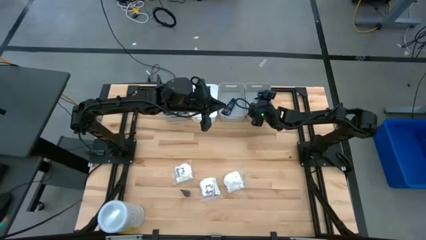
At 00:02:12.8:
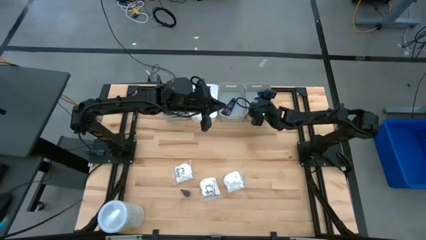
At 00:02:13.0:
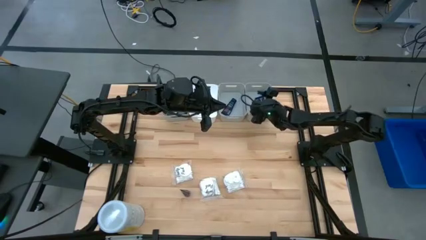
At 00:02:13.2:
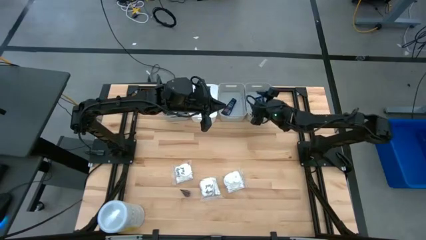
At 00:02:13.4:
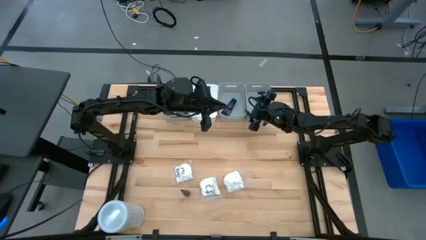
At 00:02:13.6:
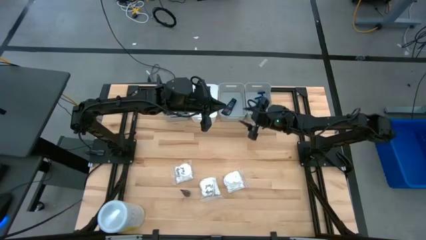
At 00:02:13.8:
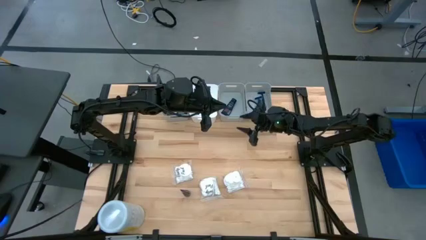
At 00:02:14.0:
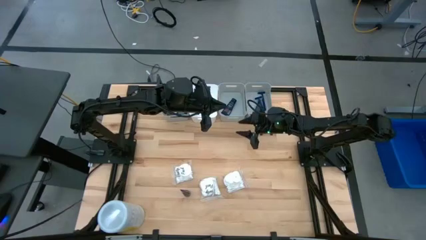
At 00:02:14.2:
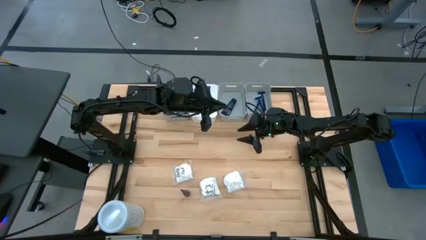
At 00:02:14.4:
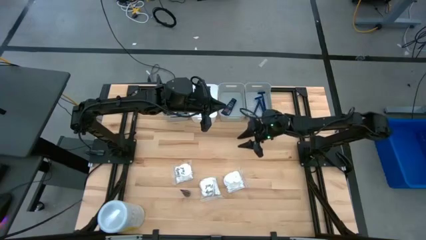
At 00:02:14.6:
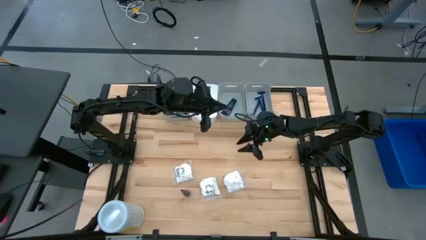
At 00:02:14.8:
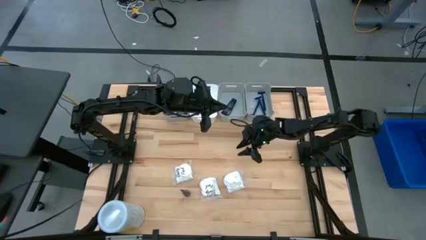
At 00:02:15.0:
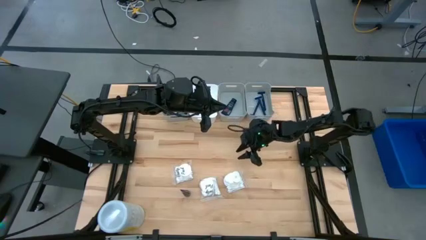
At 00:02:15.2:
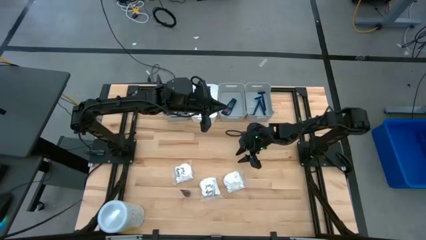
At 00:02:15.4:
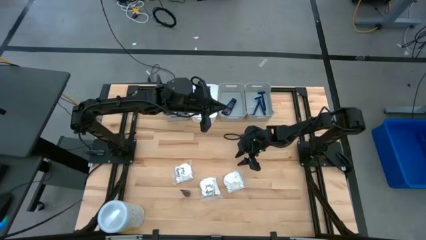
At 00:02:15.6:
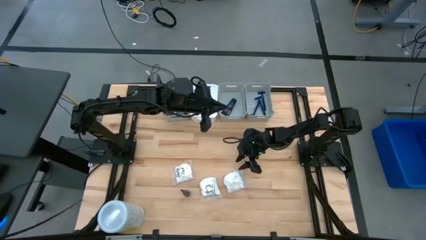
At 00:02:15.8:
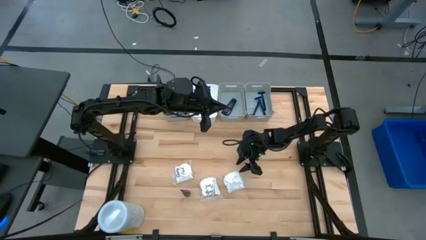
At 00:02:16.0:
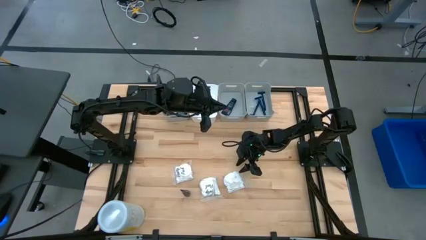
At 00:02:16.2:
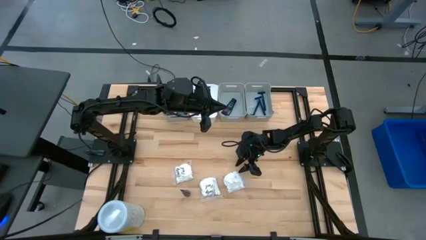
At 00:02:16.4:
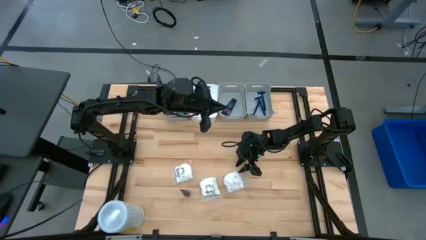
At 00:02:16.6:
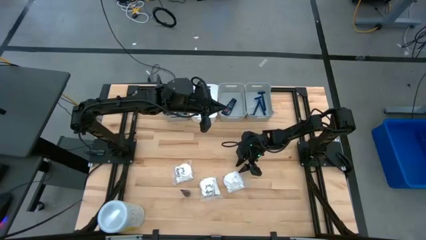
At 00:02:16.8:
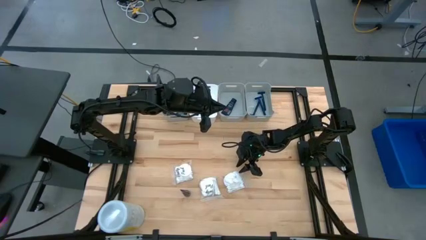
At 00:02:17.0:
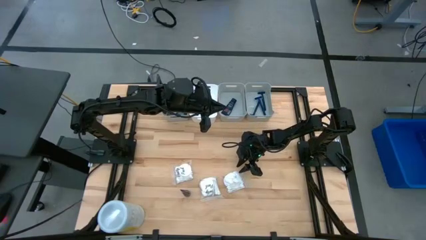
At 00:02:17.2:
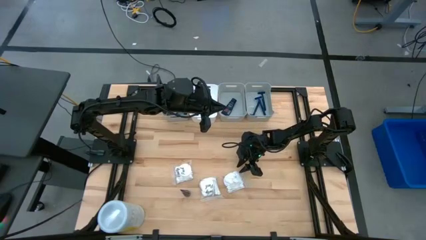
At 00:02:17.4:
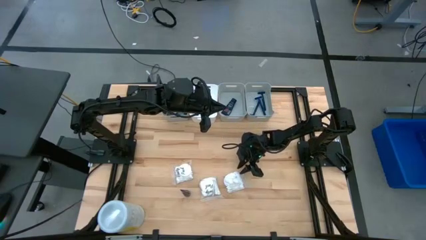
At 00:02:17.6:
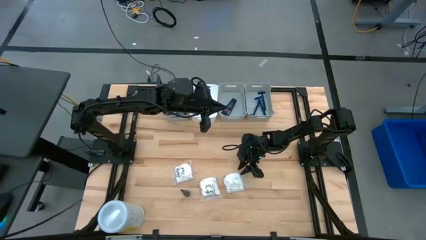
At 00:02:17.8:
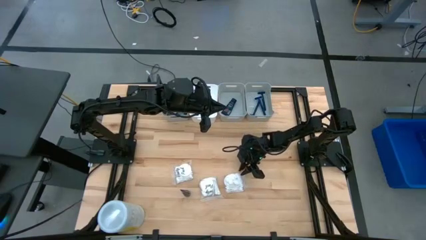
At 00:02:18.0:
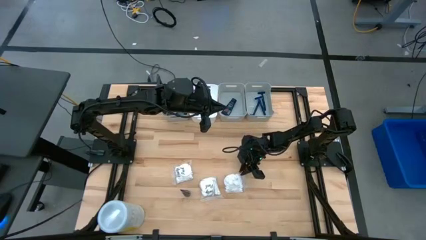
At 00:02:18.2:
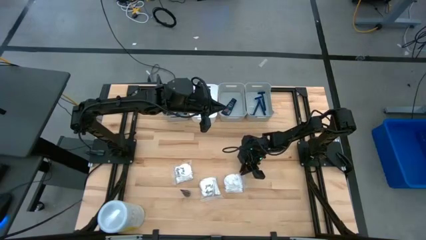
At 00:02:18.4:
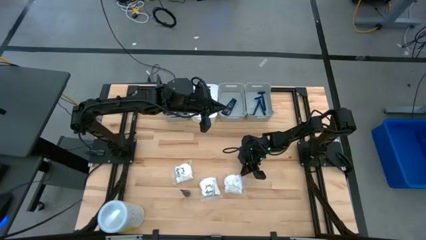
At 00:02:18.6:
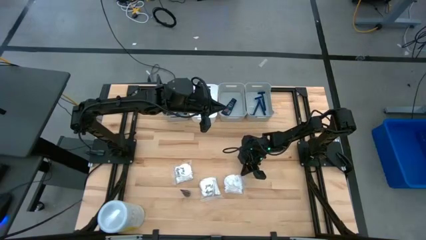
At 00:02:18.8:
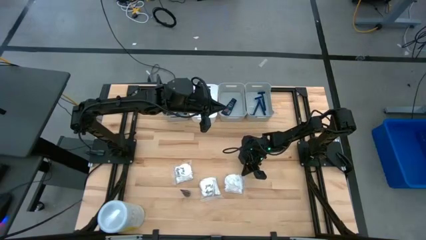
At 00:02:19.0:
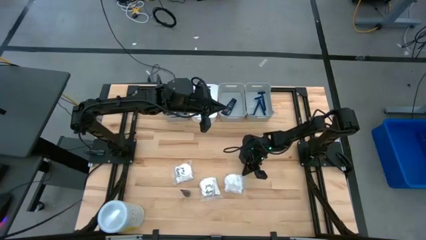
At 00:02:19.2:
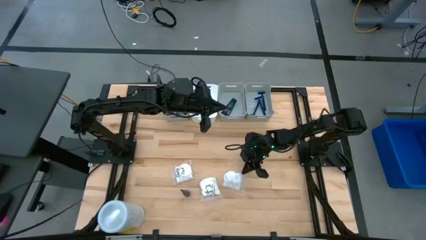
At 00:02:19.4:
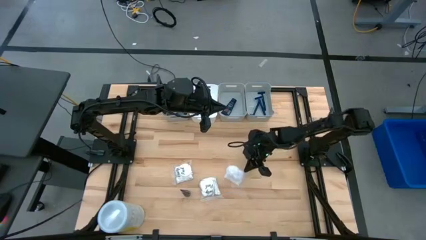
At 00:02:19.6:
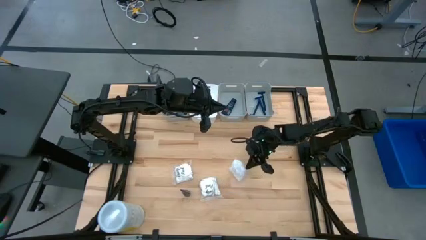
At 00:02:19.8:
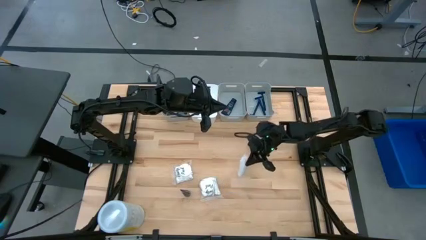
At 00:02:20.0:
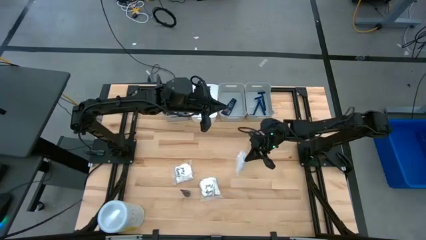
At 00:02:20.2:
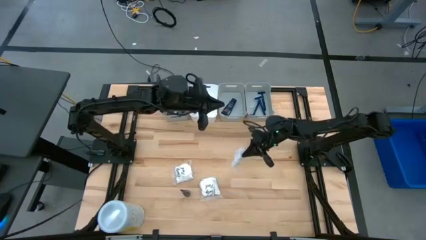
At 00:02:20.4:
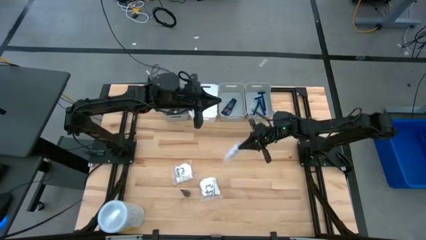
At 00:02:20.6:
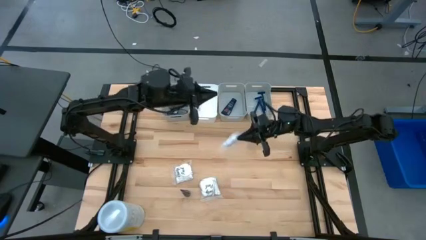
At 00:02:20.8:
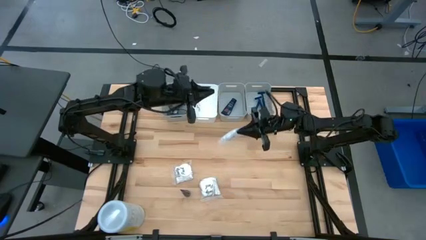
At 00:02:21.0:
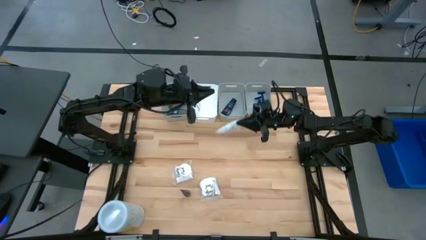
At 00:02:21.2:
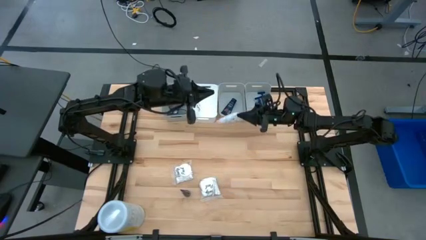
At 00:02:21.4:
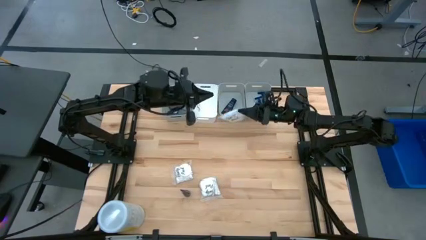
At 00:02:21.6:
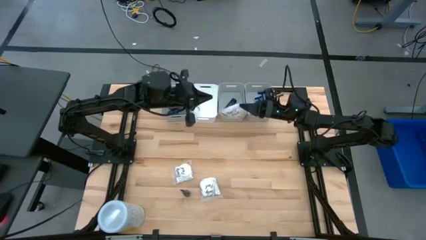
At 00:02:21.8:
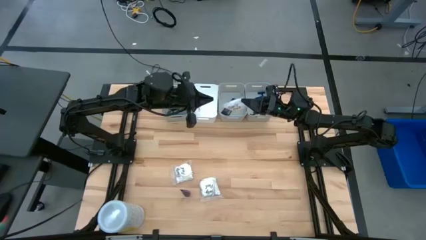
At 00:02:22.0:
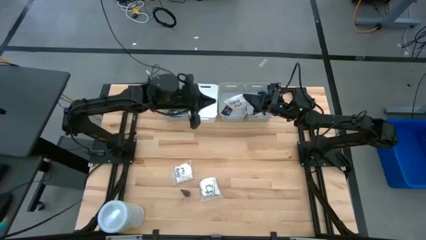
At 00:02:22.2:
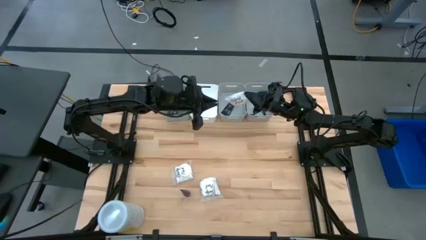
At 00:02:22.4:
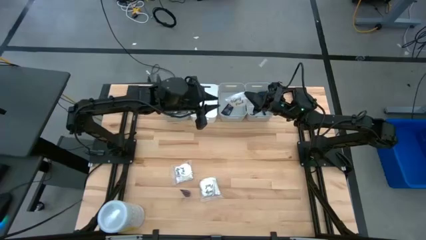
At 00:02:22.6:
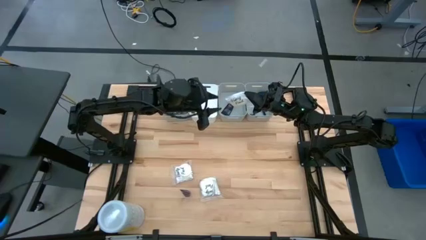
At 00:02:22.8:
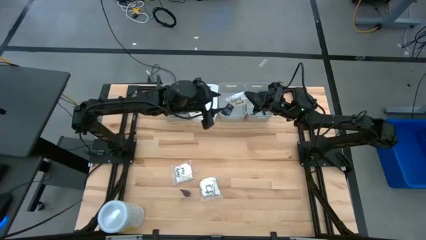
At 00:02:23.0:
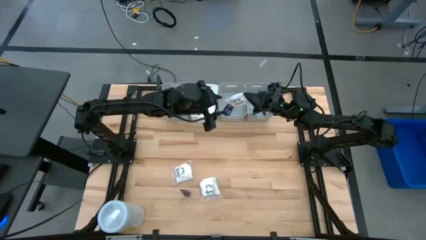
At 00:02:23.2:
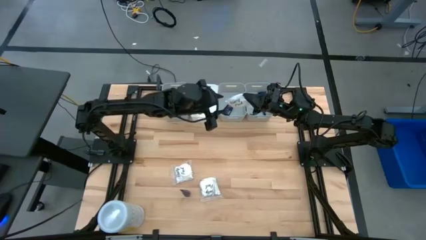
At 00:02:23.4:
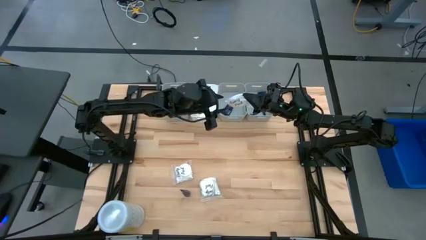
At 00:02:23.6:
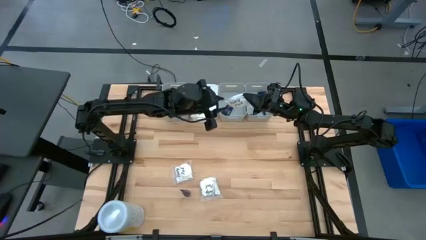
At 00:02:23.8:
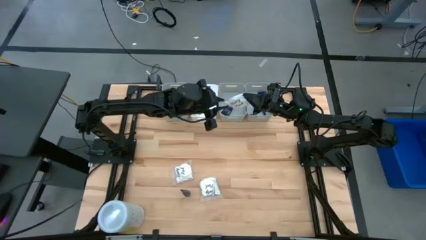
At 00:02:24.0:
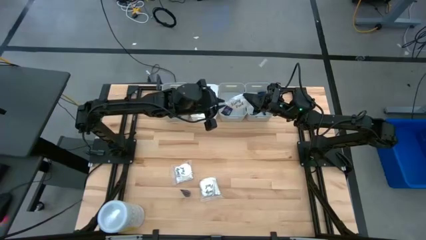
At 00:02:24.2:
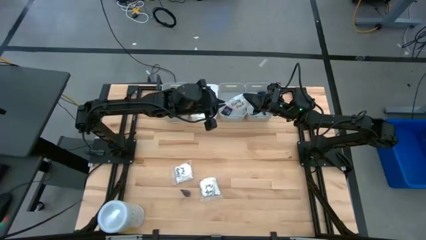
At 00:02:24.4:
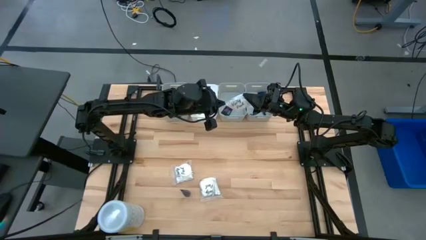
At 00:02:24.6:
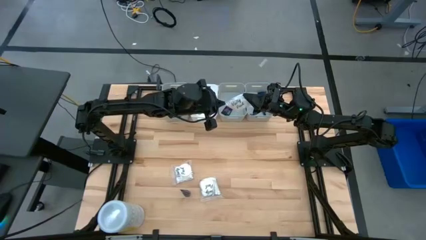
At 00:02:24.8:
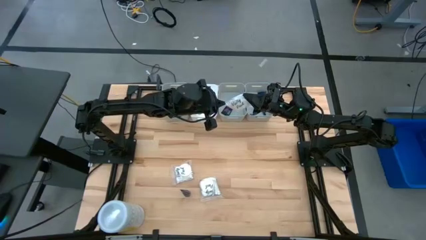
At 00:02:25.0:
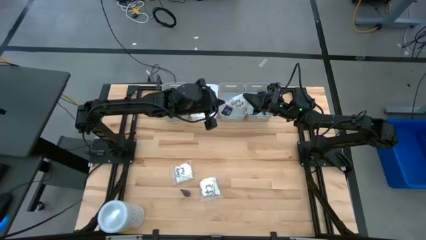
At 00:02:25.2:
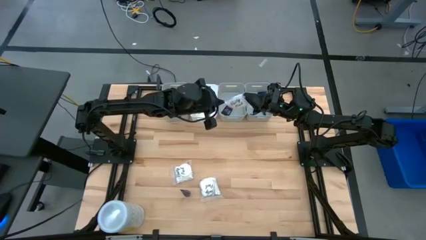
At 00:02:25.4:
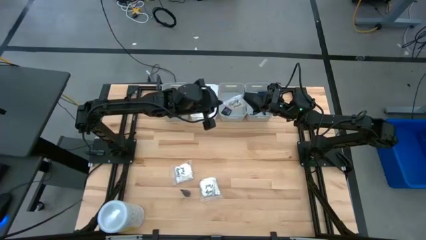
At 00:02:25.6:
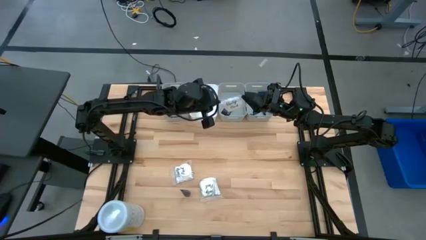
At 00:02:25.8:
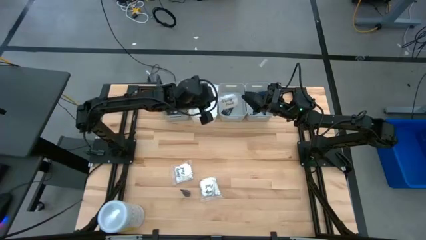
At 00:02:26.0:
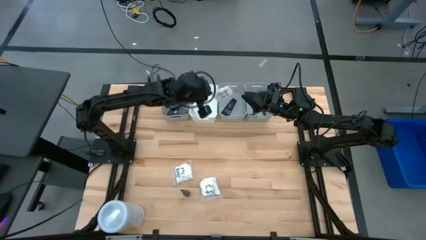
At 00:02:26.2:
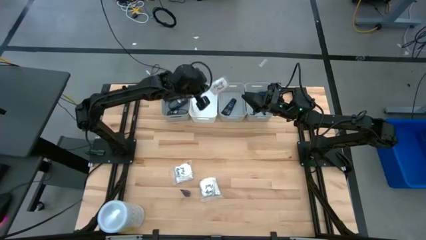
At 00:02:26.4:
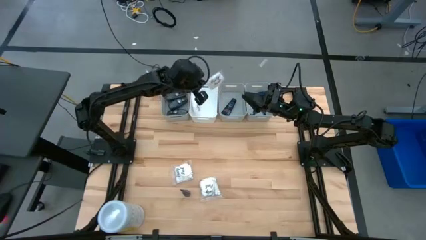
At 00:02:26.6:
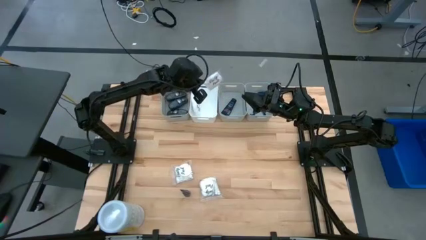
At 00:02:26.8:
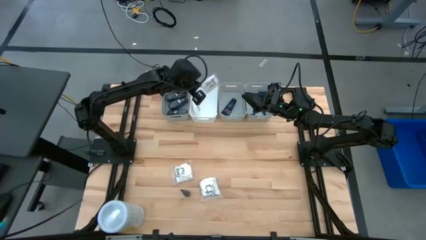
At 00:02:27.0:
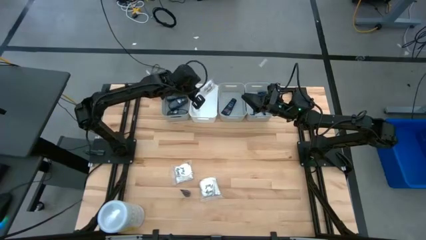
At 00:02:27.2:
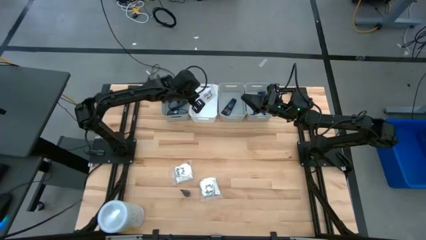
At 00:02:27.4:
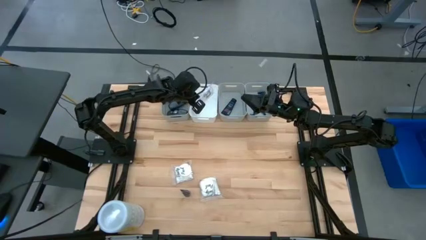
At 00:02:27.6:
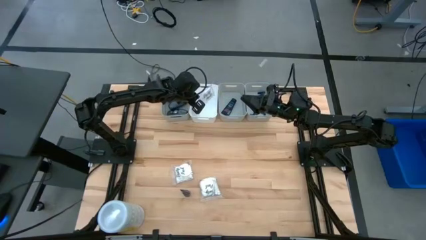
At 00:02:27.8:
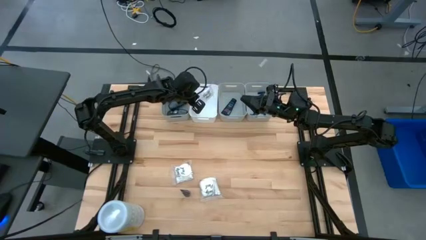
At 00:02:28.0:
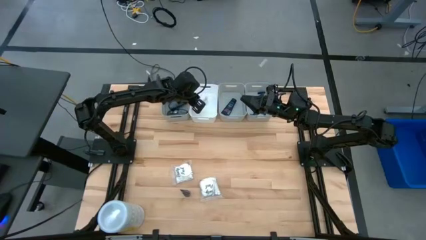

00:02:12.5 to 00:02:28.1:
Task: Pick & Place Travel size toiletries
Put the white cotton pack into the white bin
